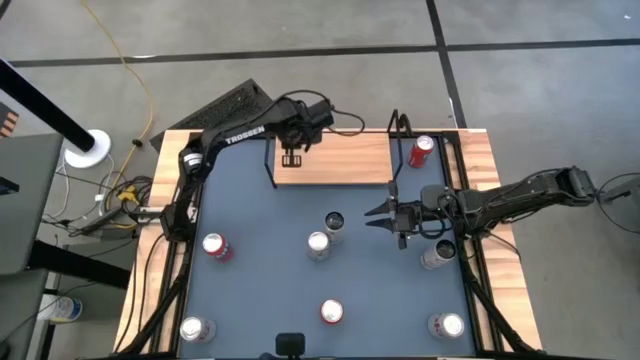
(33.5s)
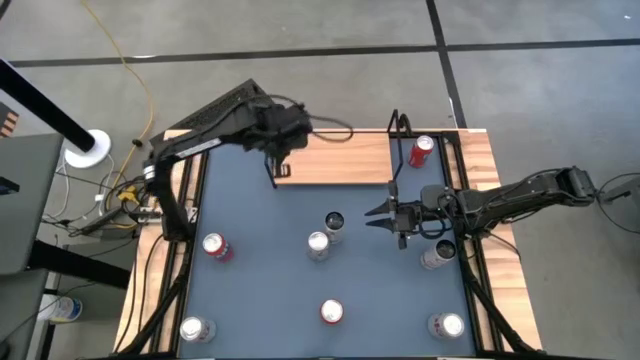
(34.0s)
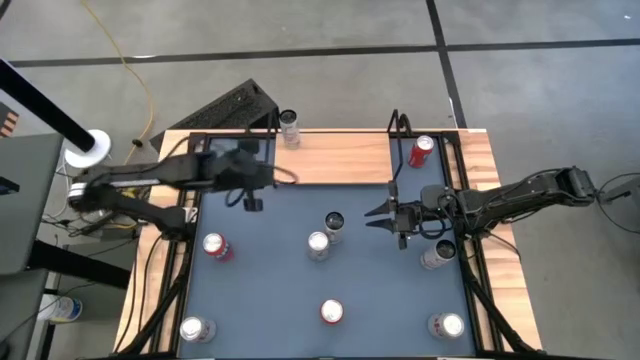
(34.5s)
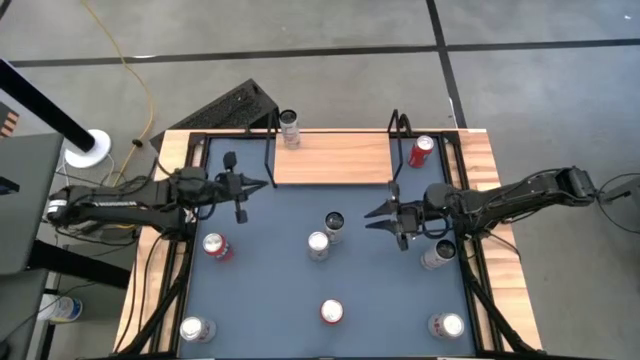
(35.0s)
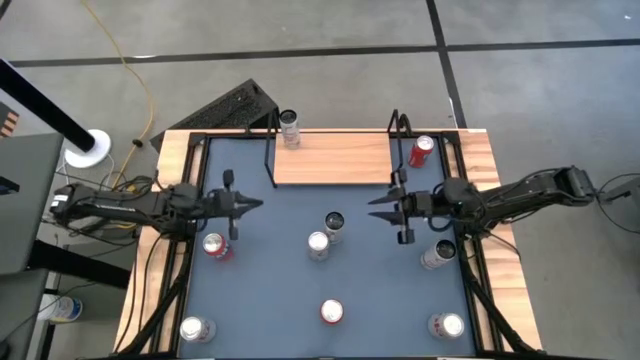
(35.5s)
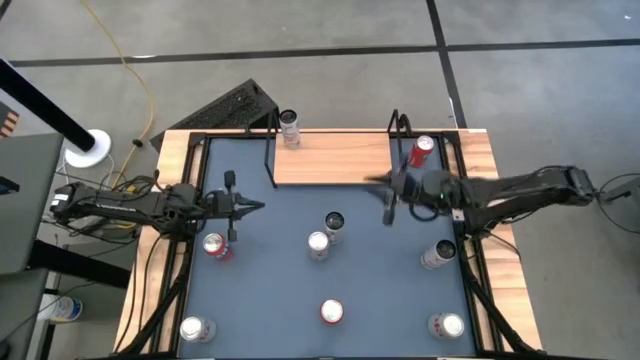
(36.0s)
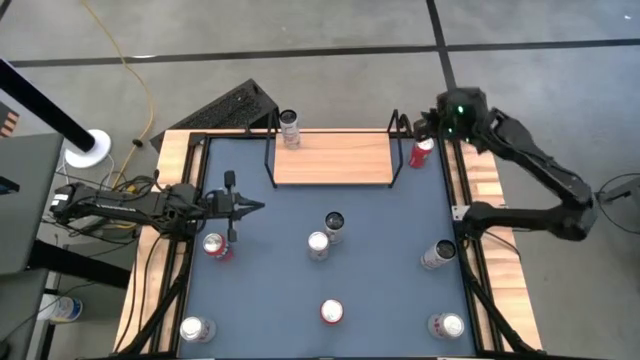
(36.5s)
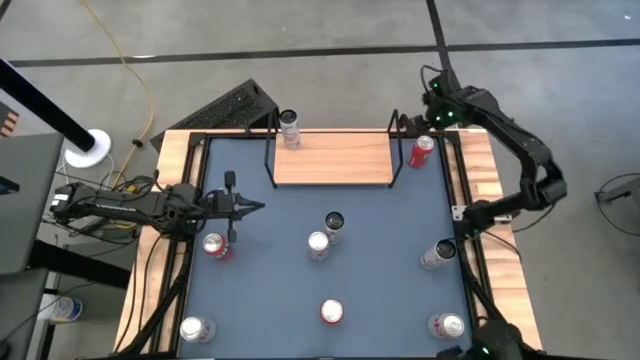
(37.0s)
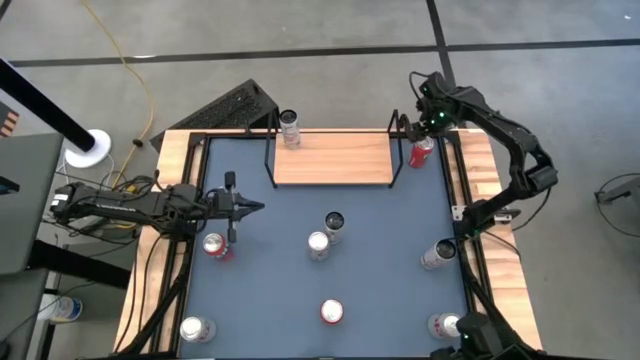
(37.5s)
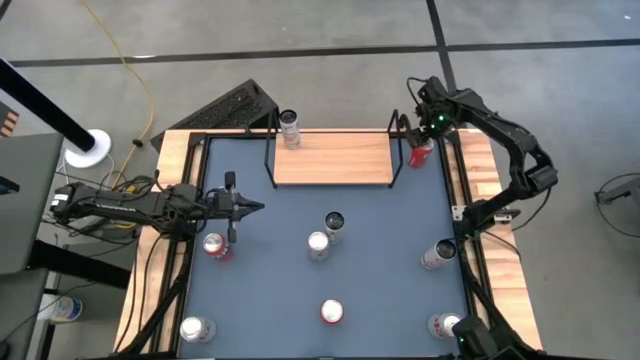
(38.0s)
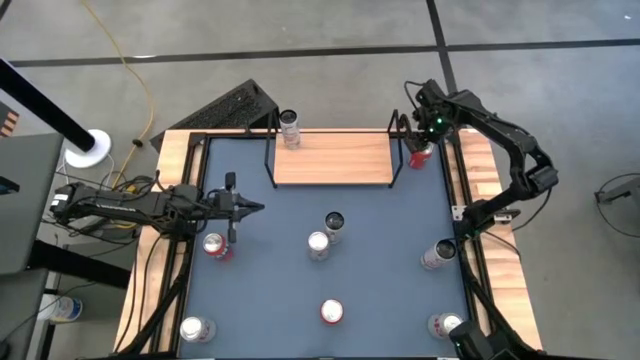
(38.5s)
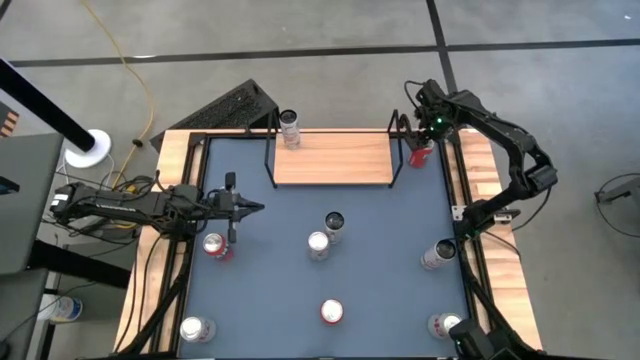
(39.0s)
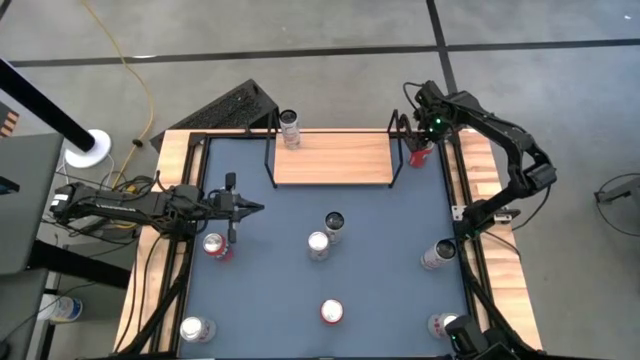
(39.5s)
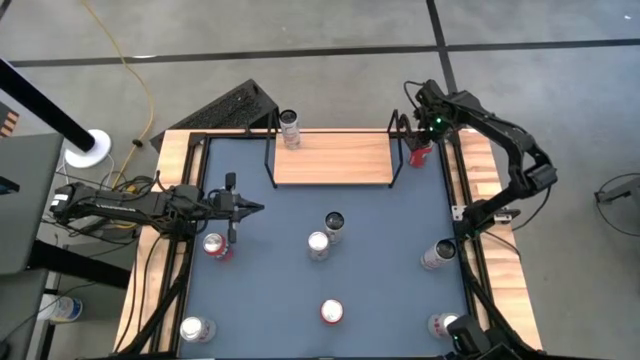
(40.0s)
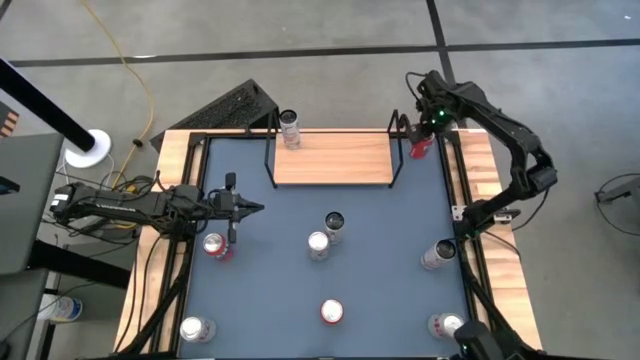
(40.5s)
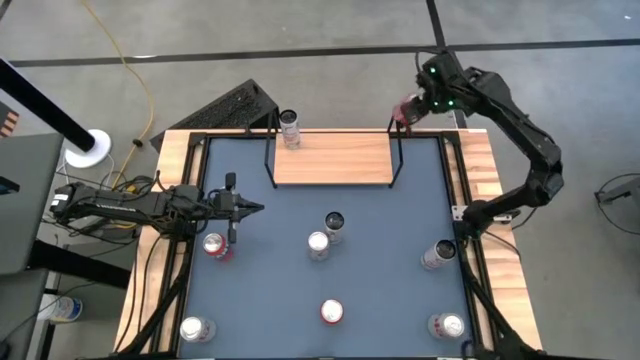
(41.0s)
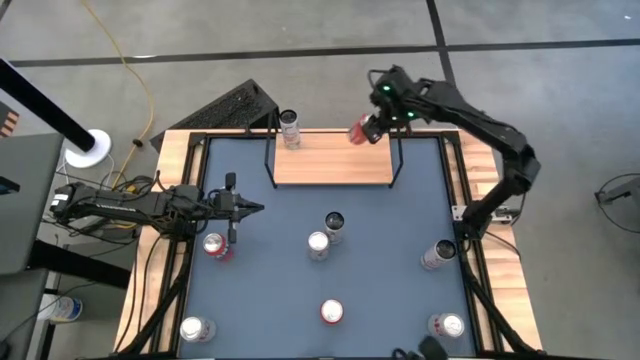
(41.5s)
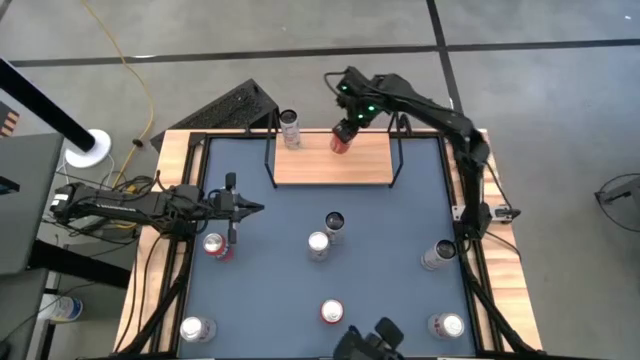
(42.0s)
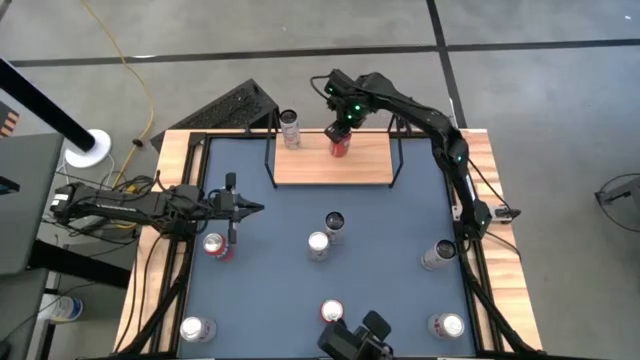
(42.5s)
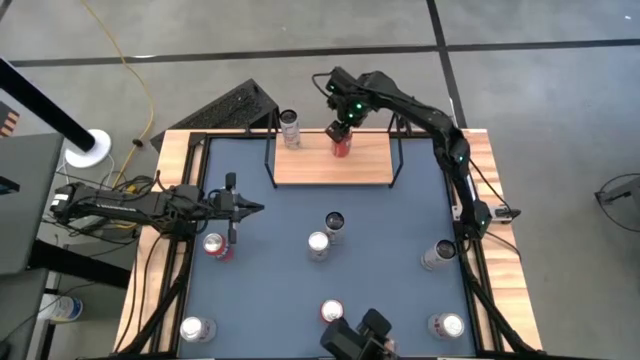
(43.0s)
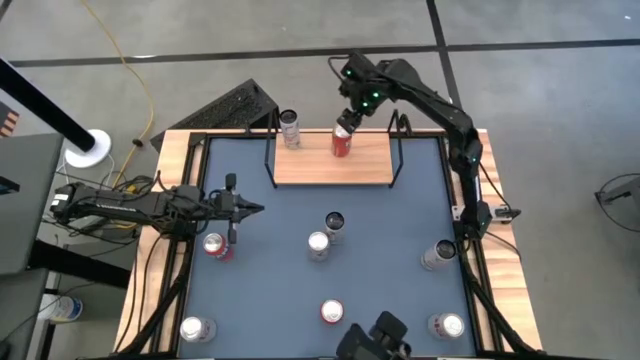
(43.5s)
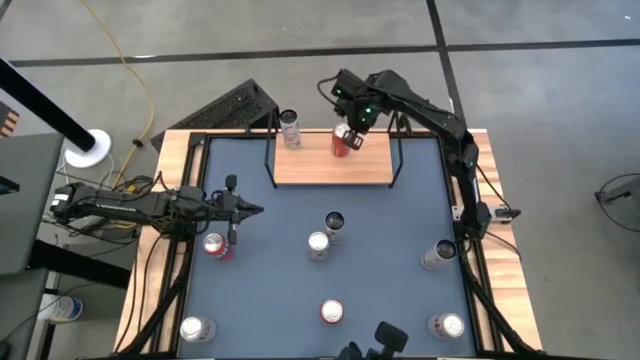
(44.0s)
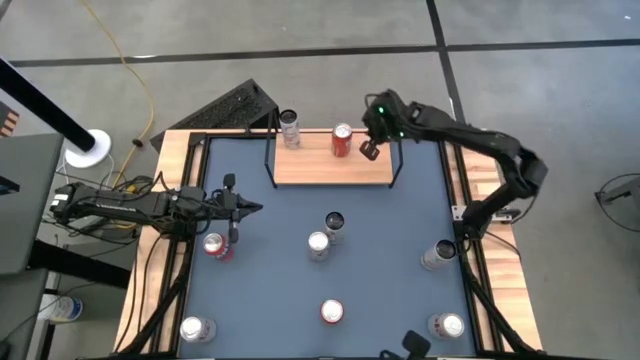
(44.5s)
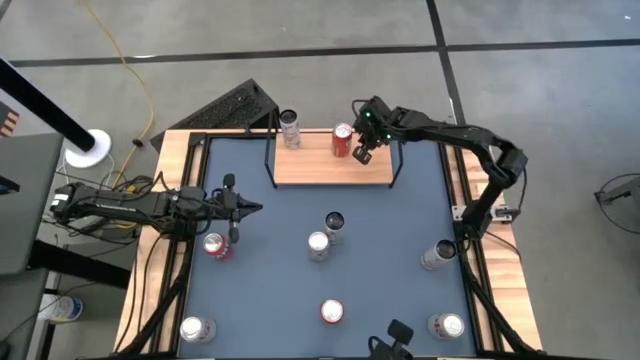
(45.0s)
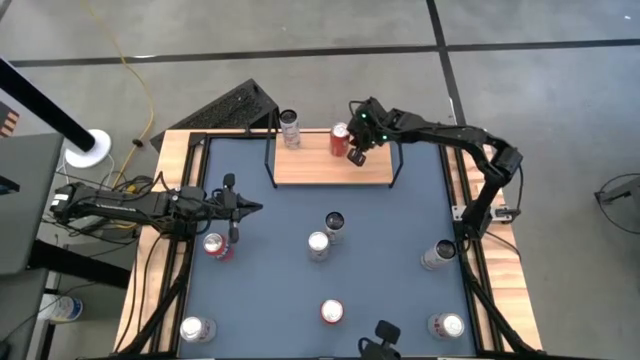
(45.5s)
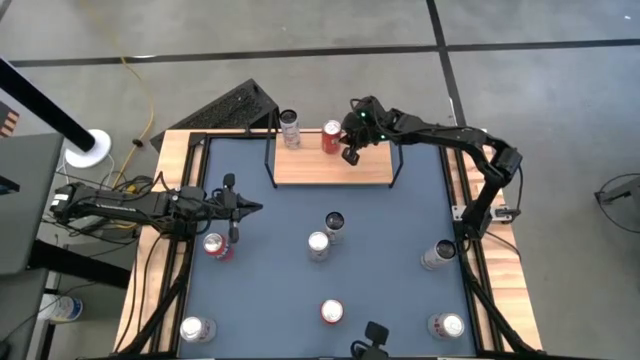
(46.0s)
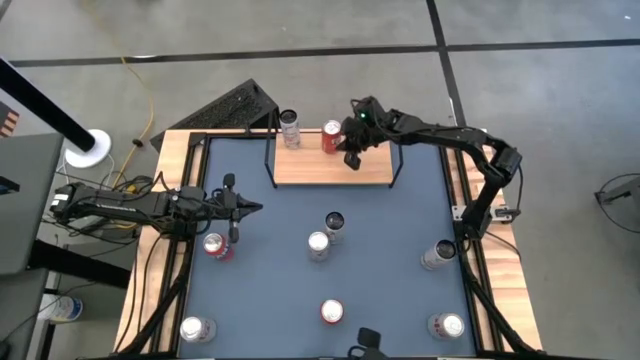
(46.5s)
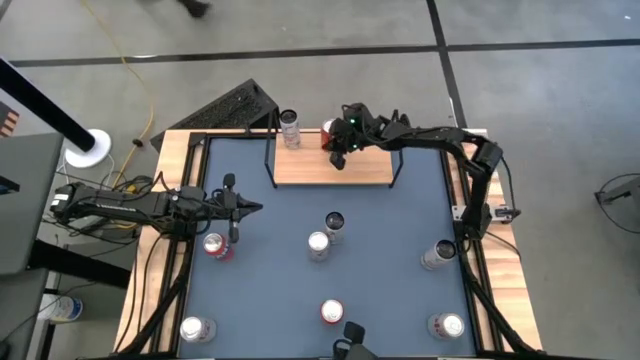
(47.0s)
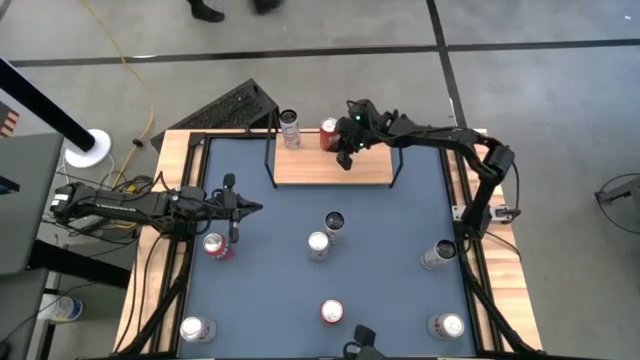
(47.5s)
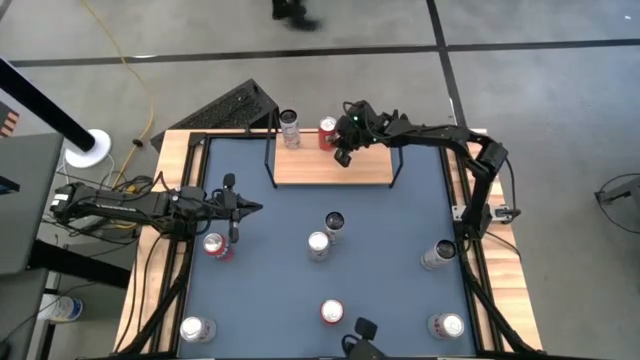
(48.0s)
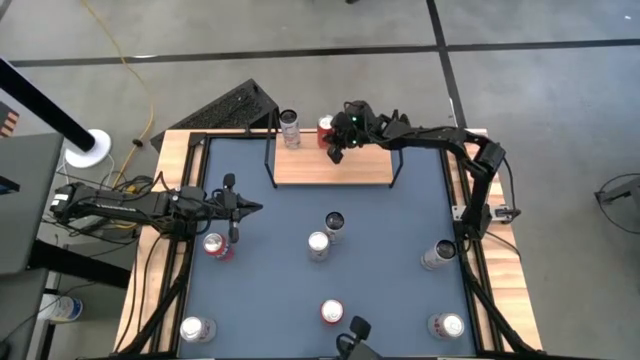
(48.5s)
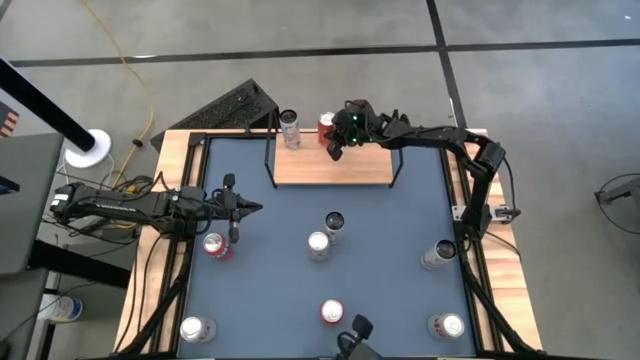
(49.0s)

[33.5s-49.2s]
Task: Place canned beverage on shelf
Put the top red soda can on the shelf

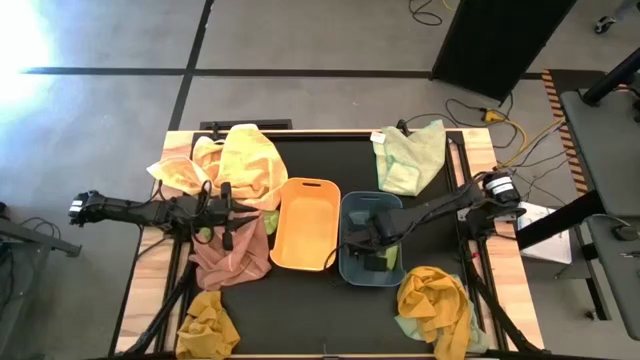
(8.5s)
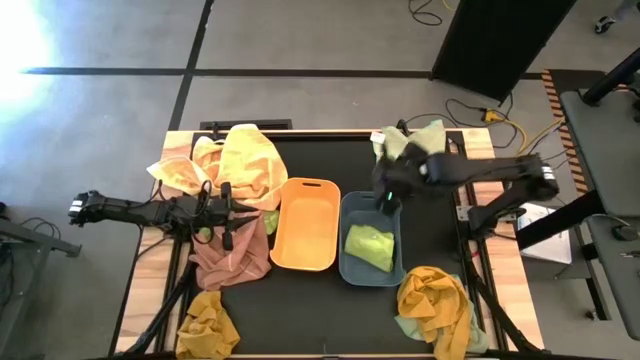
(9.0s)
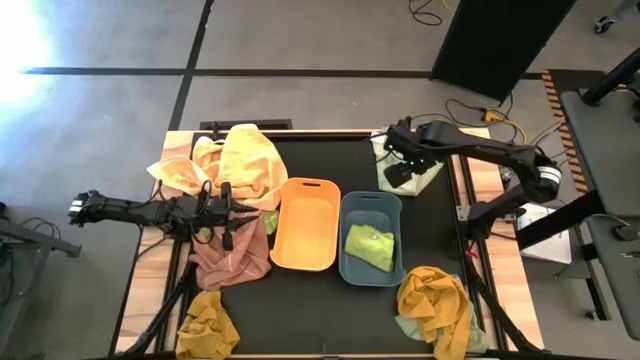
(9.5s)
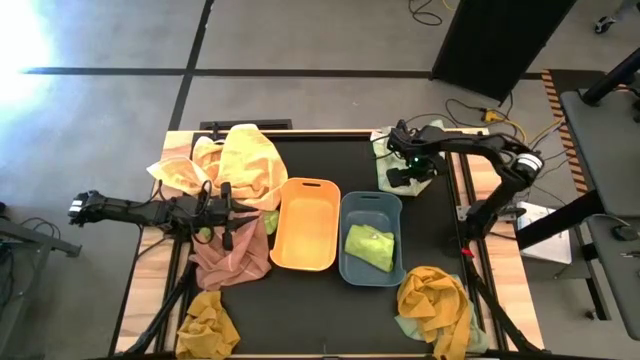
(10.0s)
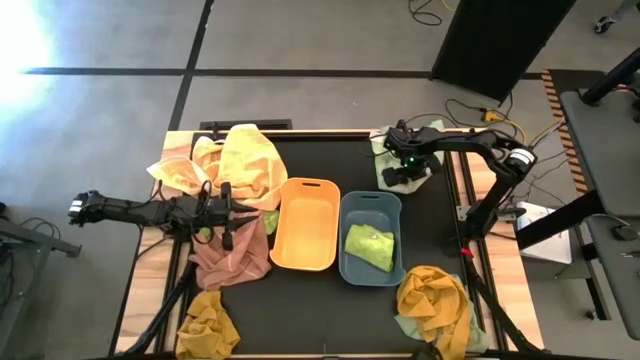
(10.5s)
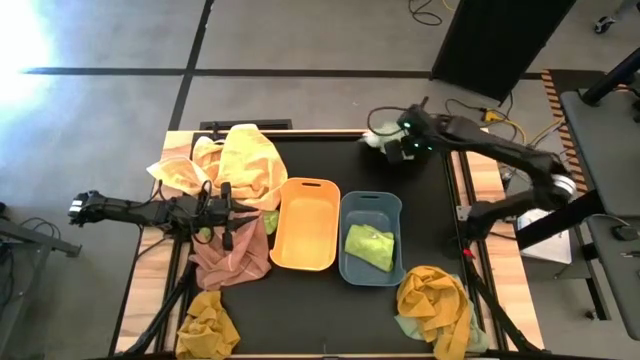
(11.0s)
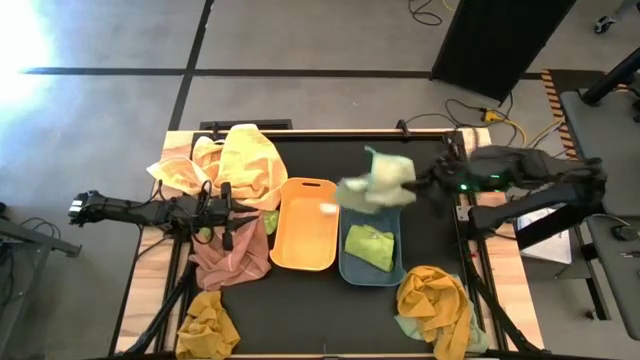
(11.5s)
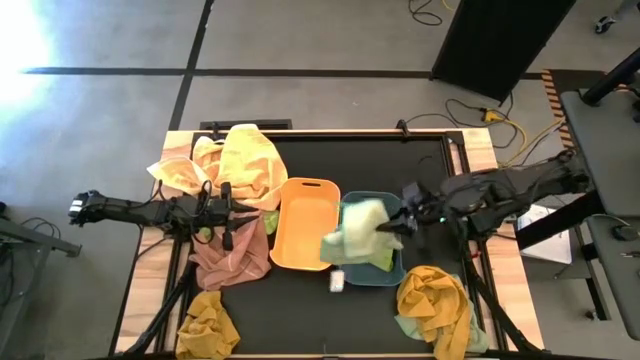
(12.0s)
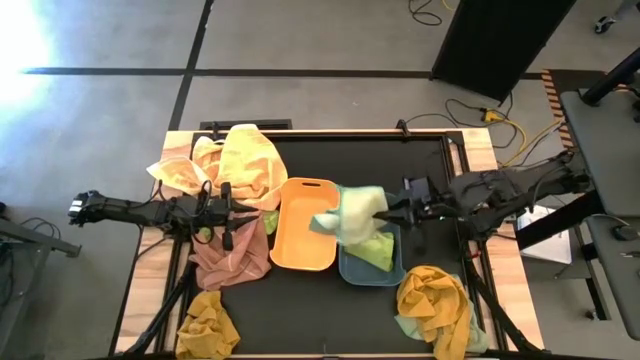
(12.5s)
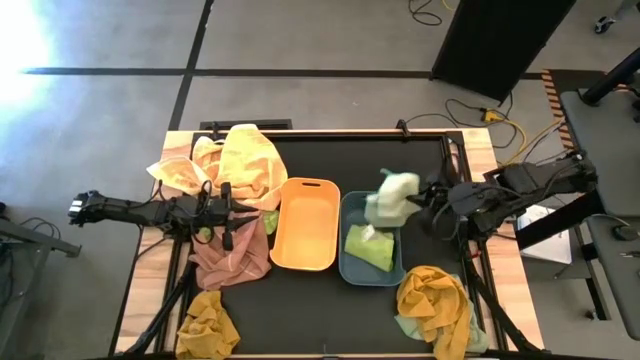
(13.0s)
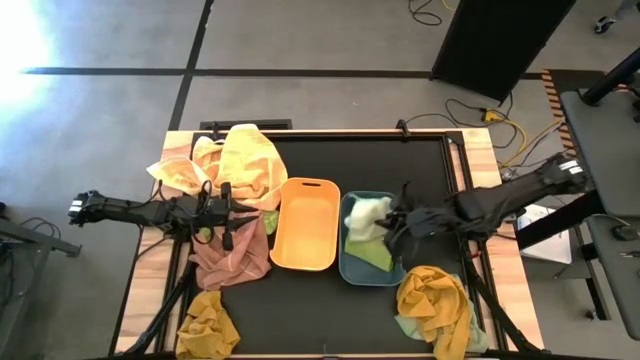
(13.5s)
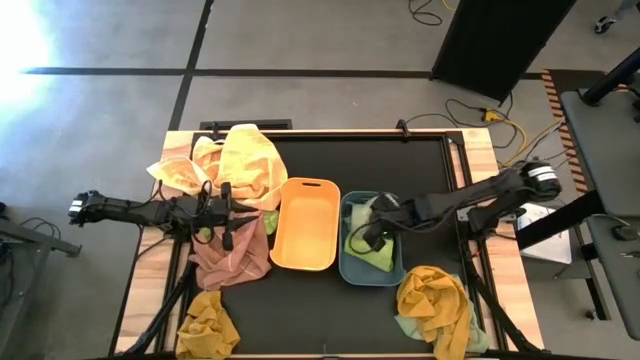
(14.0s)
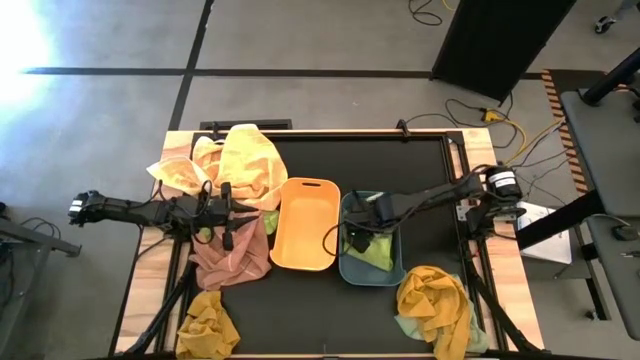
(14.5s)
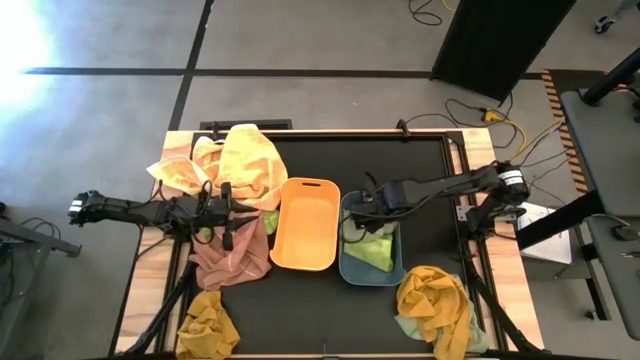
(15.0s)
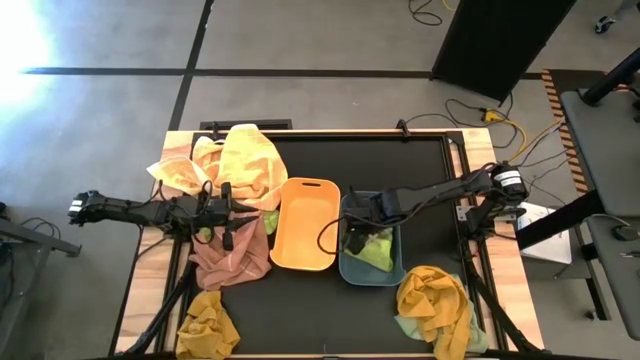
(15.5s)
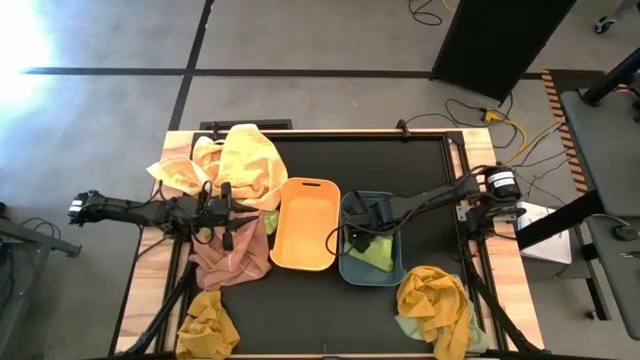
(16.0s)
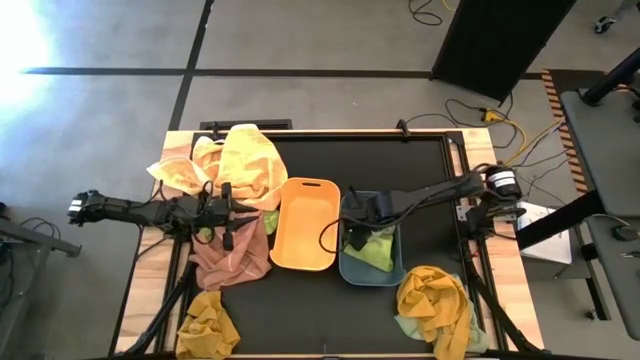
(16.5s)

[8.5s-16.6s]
Task: Sort towels by color in basket
Put the top white towel into the blue bin
